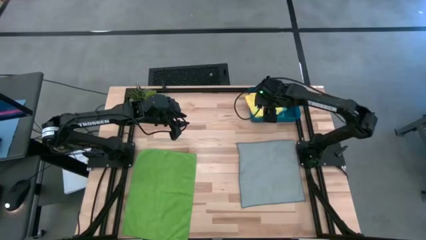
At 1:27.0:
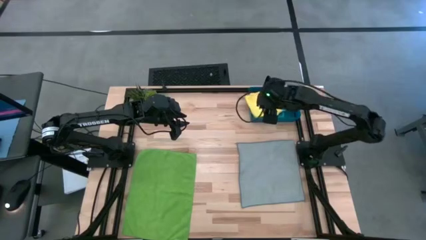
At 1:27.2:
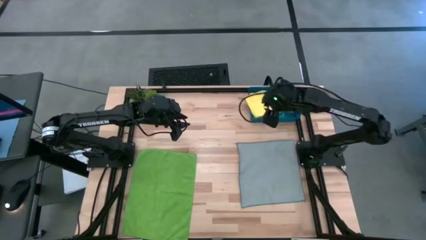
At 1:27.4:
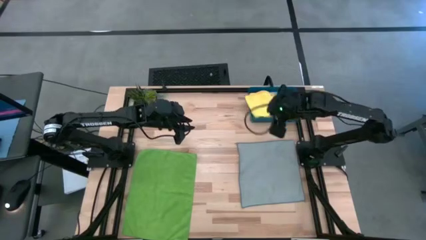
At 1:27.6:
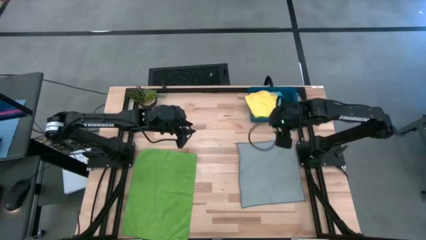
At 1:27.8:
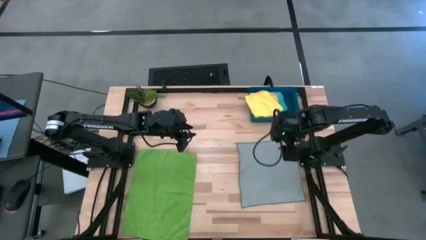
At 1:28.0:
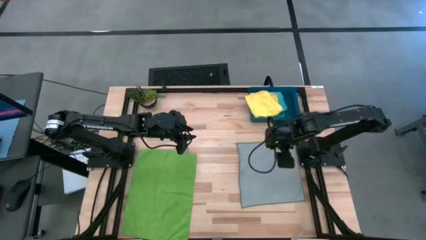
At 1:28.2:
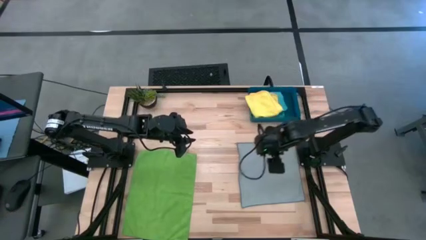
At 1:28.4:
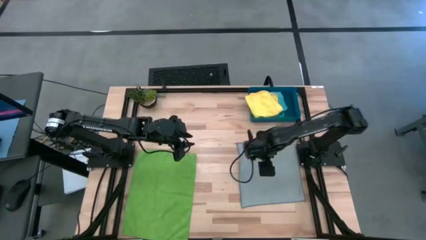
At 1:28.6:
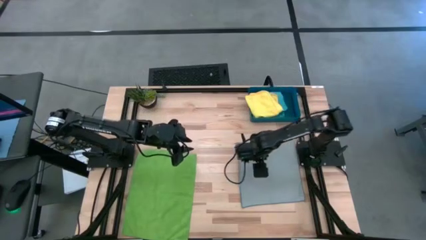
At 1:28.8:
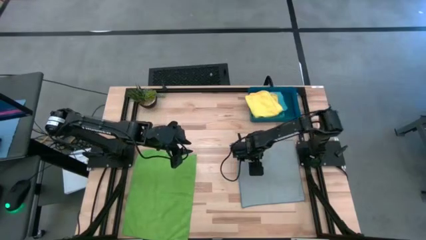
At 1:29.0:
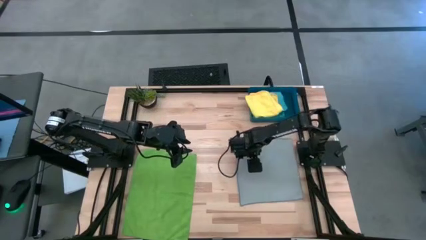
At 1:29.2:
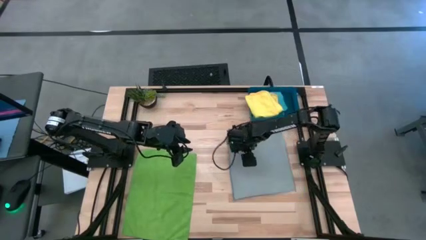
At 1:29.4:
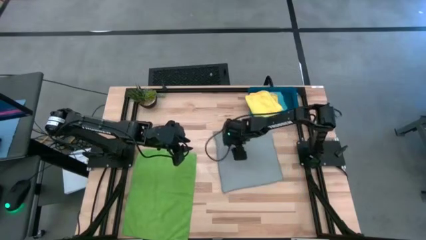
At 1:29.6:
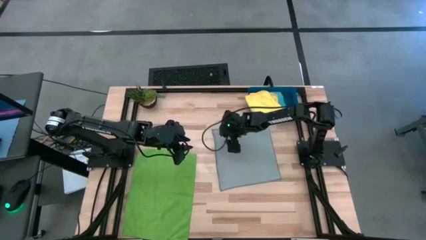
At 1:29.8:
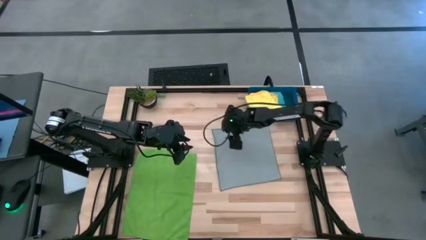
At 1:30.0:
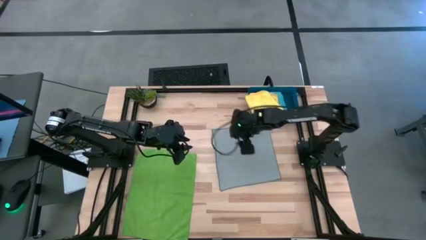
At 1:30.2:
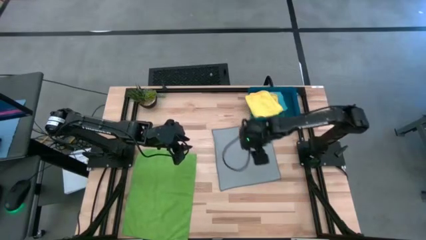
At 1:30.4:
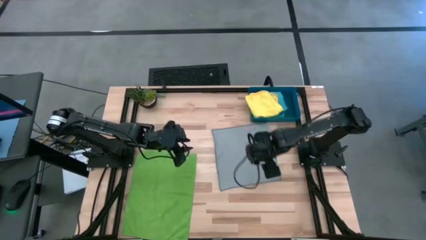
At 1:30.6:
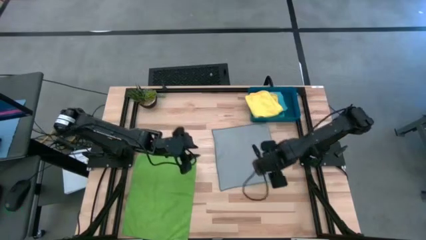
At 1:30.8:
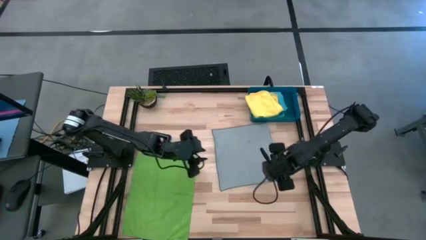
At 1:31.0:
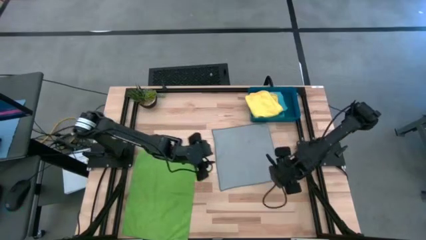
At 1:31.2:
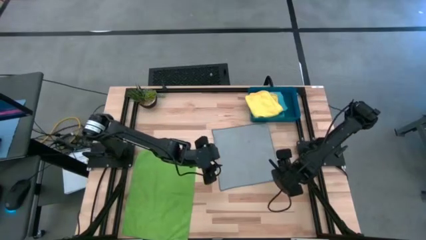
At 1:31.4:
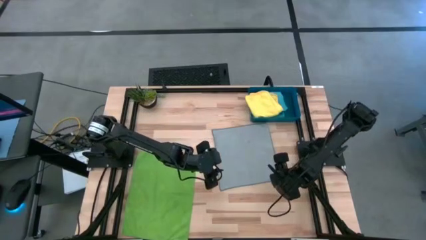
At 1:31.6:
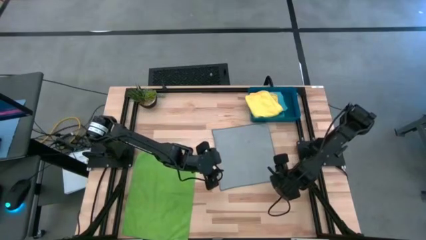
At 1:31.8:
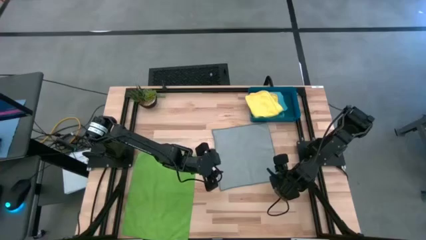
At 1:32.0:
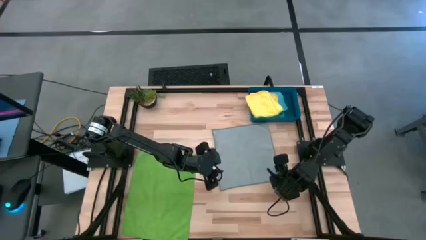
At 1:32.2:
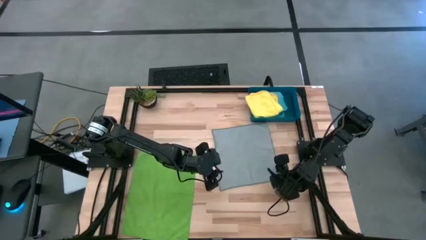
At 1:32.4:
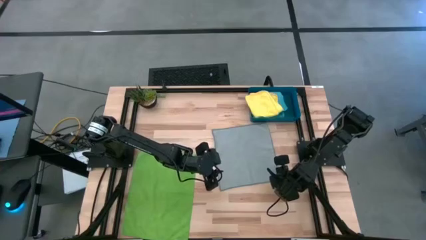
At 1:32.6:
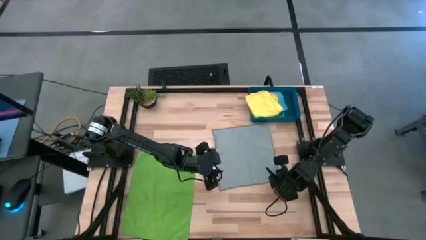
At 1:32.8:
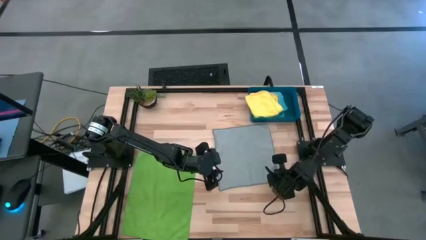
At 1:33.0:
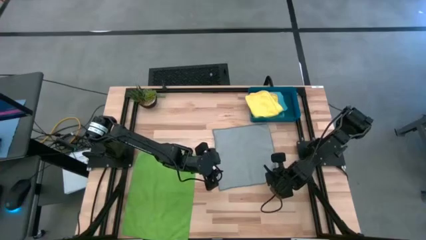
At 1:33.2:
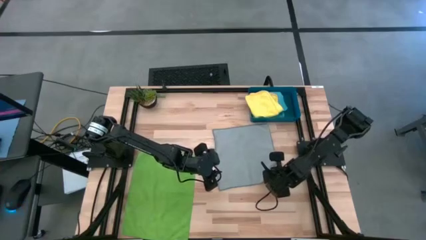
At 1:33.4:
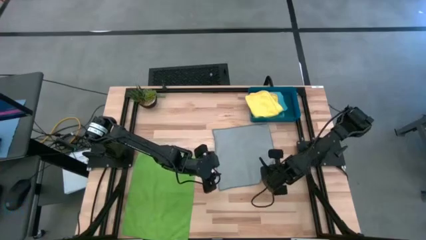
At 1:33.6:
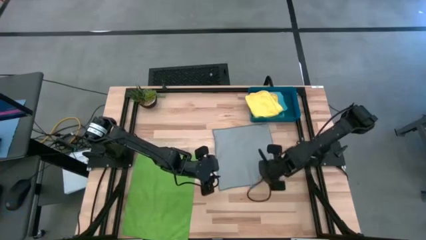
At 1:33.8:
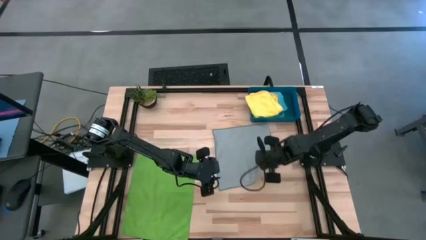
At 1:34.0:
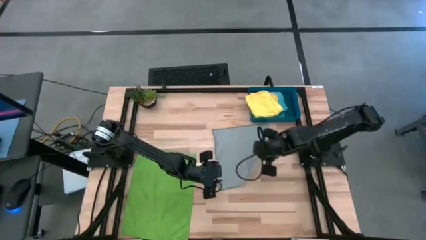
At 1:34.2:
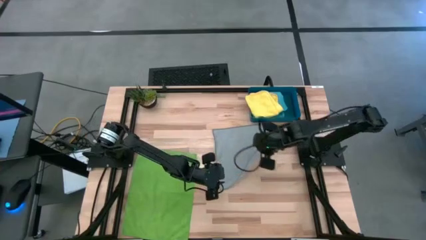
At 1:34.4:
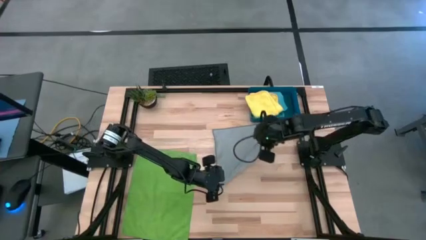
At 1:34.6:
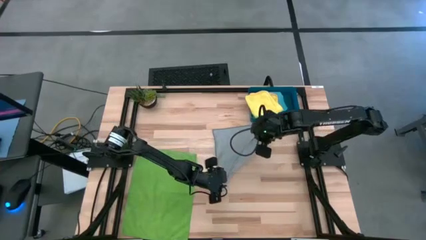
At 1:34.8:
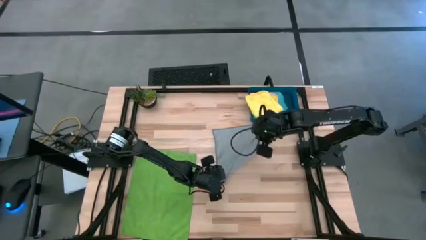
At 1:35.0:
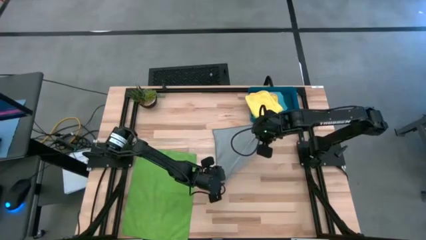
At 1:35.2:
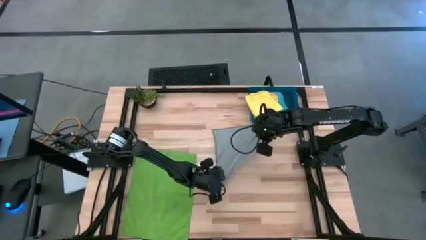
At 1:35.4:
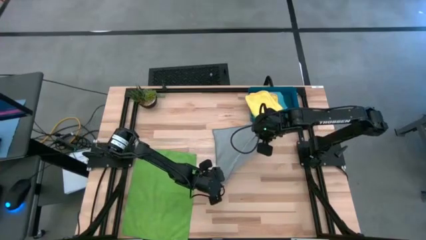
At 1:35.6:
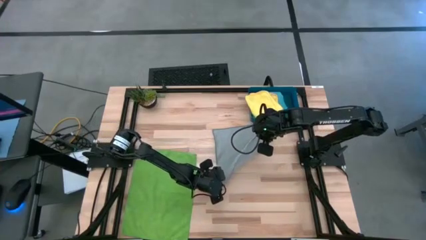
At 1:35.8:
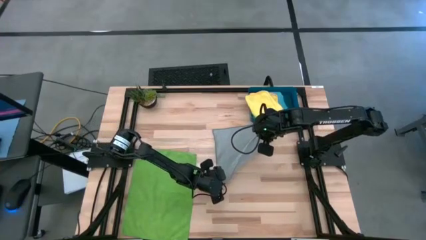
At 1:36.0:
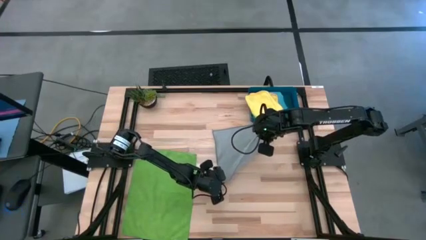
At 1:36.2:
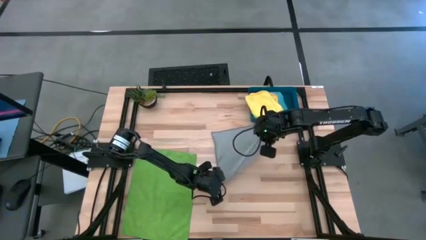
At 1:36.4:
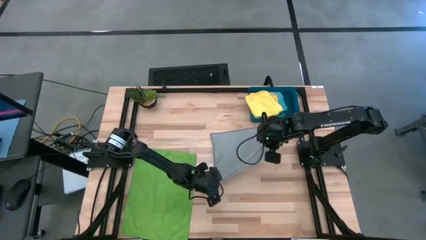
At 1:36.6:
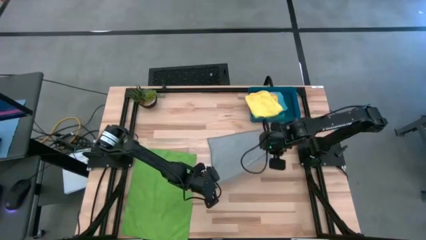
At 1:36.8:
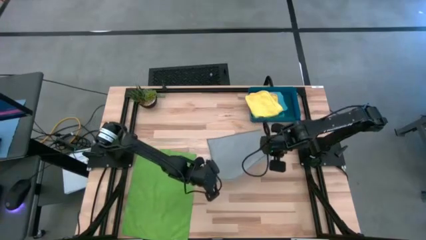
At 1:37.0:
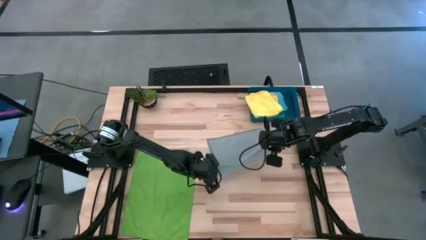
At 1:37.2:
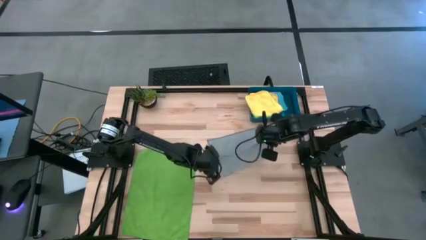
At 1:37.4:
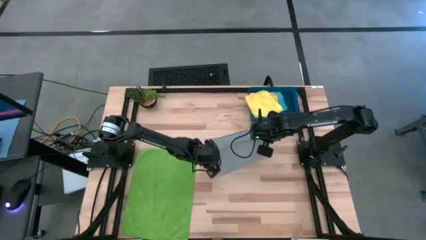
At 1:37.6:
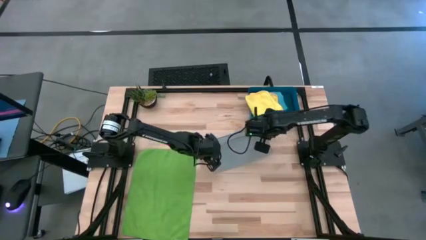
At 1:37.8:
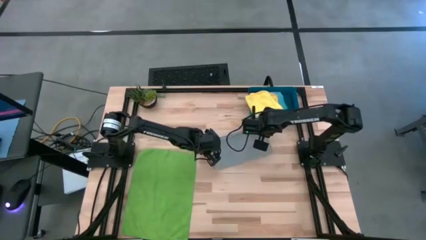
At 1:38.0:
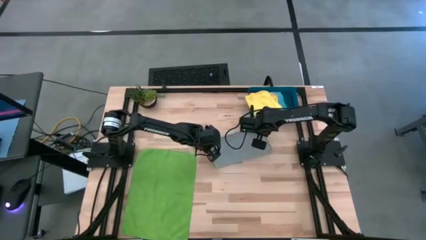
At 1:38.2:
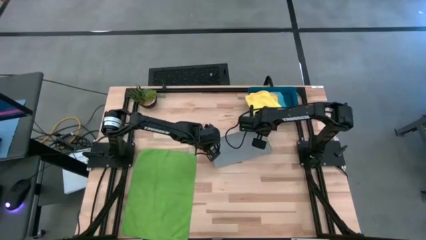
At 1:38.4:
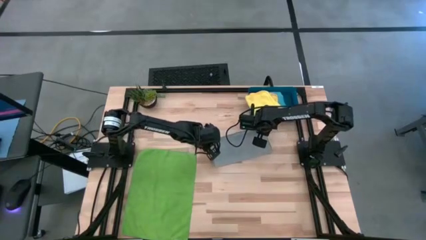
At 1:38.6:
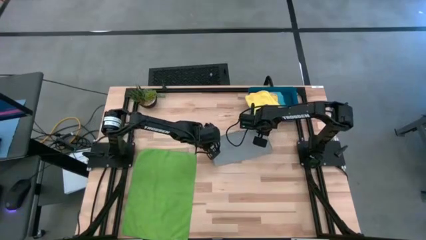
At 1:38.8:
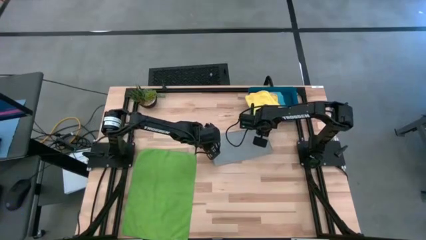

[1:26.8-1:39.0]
Task: Fold microfiber towels
Fold the gray microfiber cloth

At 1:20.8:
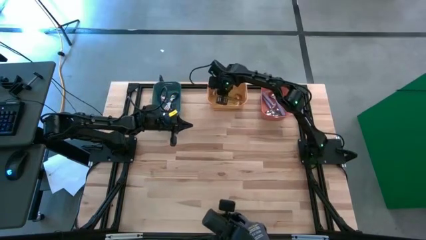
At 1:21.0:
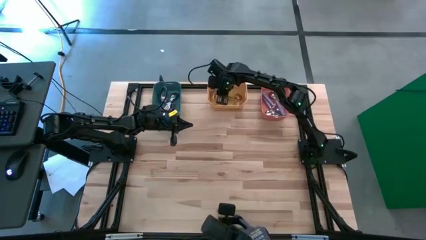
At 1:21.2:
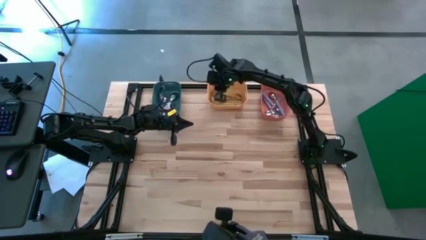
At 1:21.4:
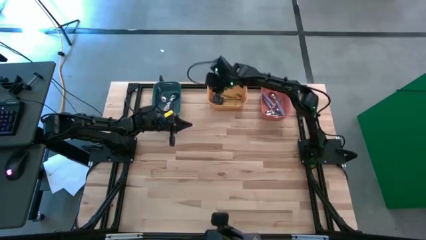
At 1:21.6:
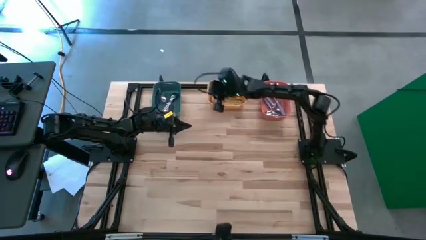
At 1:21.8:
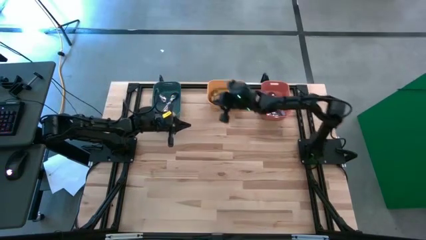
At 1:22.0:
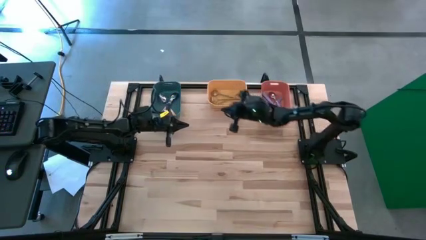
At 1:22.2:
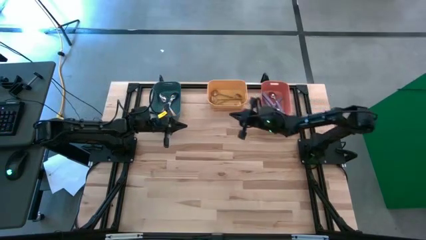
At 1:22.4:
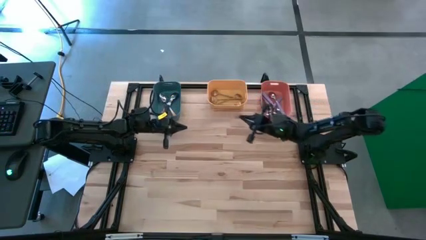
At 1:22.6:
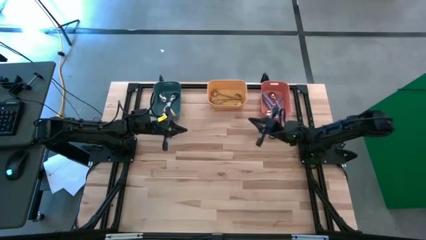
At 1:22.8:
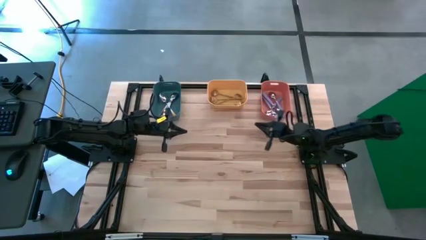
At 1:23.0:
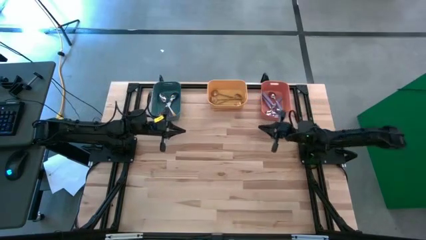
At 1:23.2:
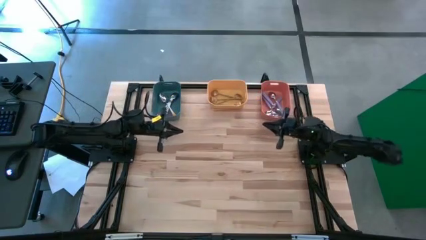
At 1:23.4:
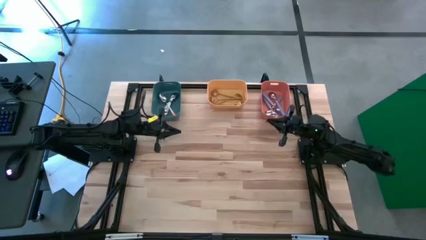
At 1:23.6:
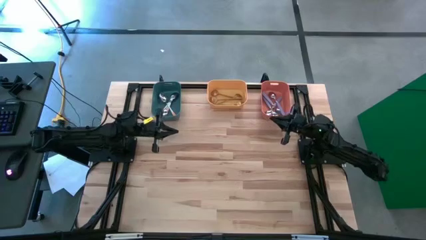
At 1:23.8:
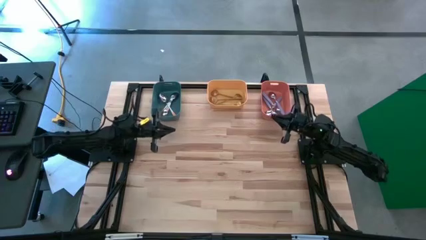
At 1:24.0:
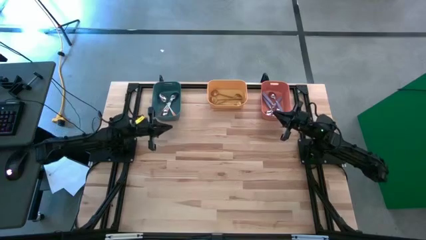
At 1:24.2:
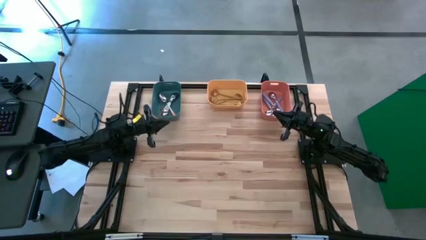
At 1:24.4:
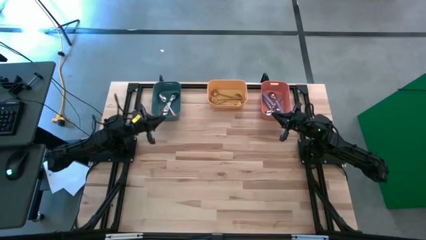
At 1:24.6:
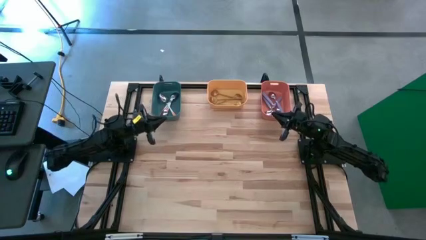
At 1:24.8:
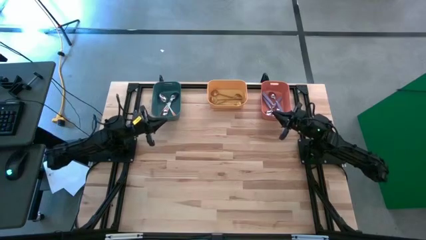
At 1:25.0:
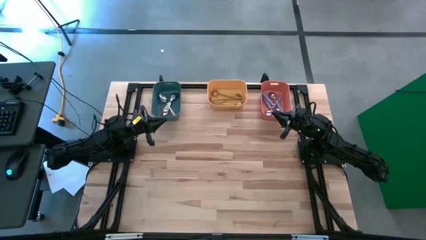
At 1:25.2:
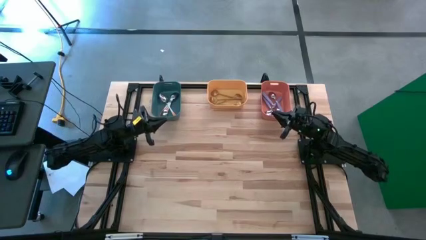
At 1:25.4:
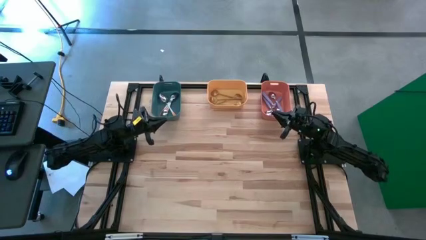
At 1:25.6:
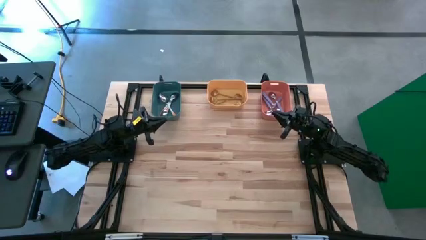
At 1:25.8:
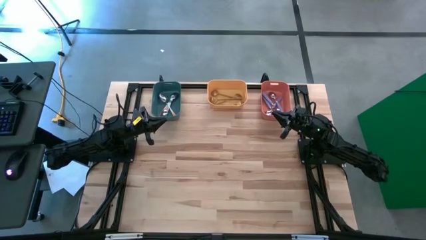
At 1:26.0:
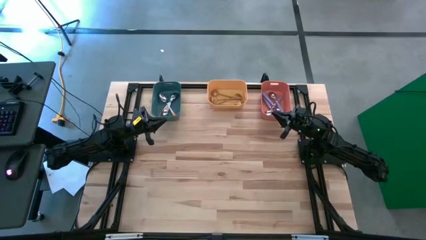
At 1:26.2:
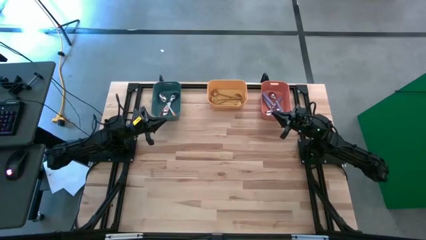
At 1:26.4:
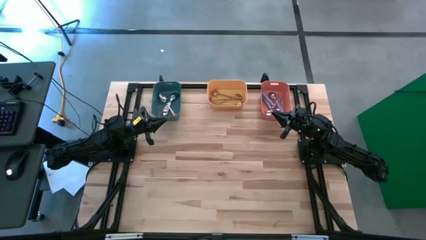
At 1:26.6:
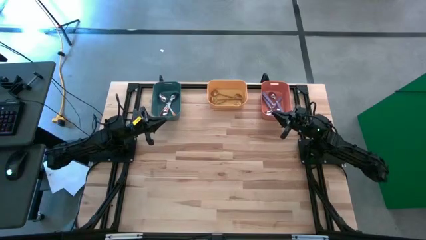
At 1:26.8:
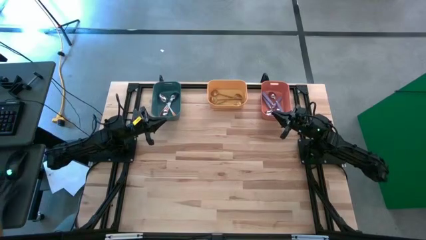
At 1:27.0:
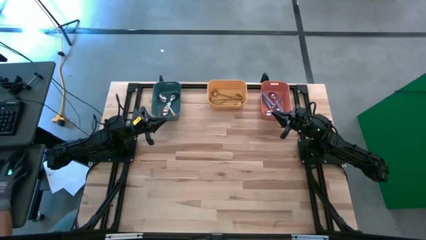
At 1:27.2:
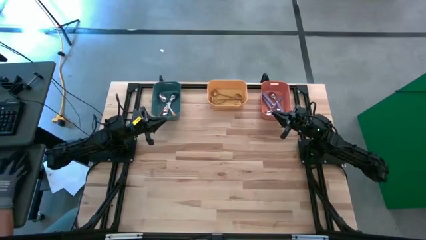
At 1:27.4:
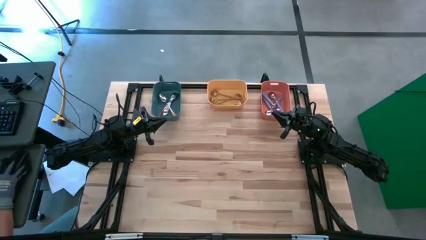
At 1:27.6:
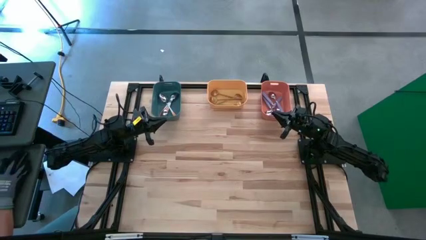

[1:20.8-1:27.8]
Task: Sort silverware by color (type)
Return to Home Position
